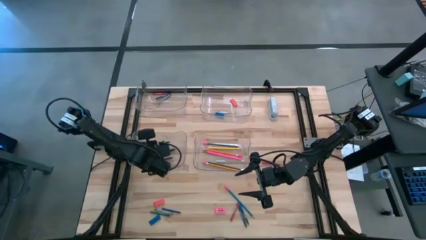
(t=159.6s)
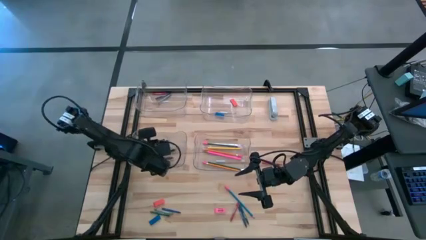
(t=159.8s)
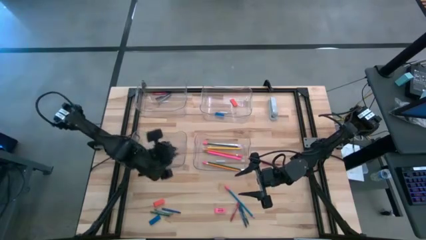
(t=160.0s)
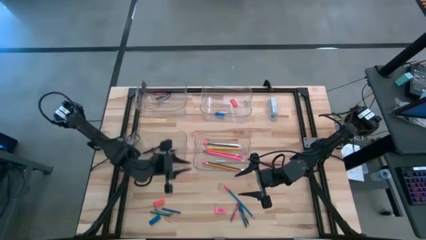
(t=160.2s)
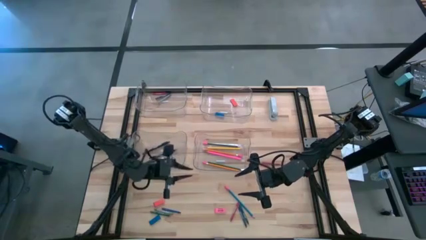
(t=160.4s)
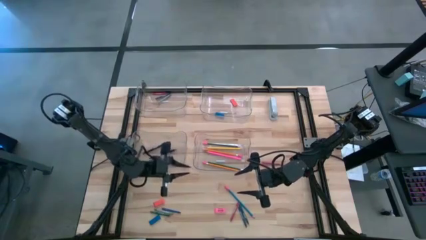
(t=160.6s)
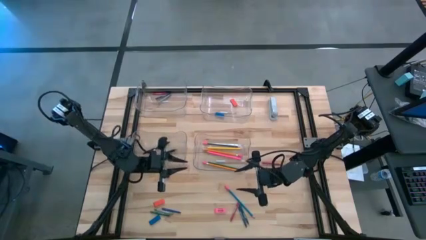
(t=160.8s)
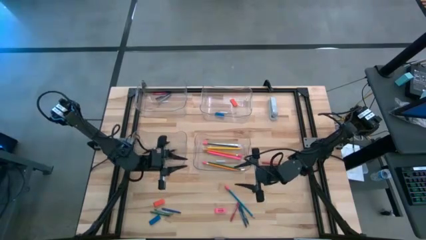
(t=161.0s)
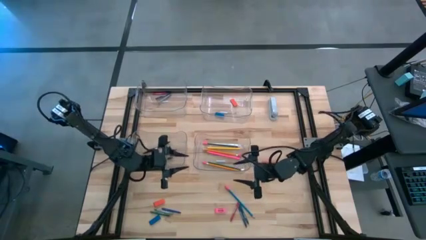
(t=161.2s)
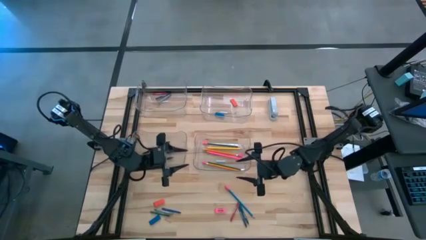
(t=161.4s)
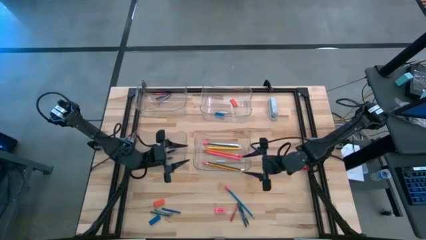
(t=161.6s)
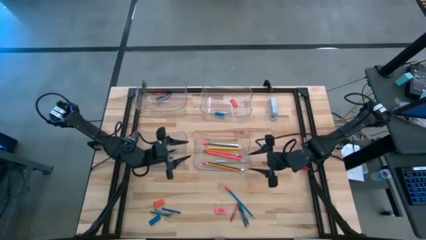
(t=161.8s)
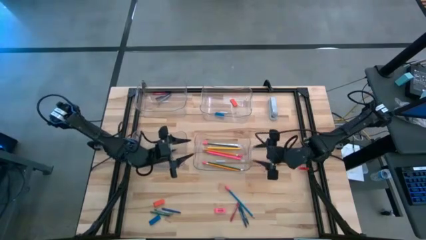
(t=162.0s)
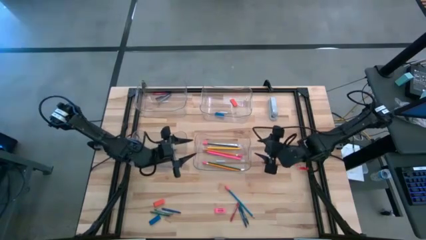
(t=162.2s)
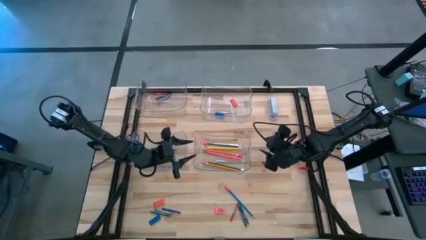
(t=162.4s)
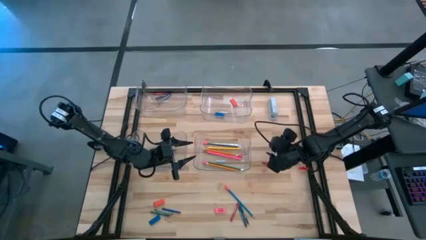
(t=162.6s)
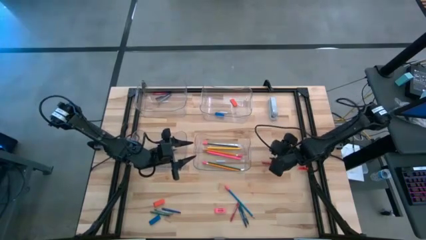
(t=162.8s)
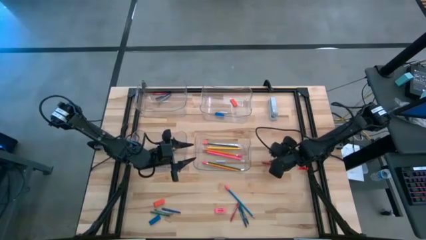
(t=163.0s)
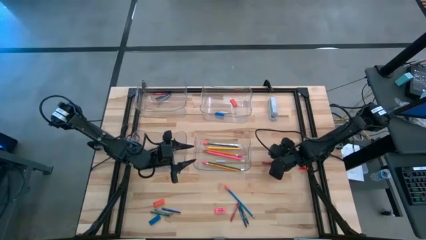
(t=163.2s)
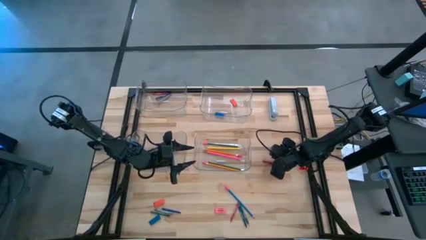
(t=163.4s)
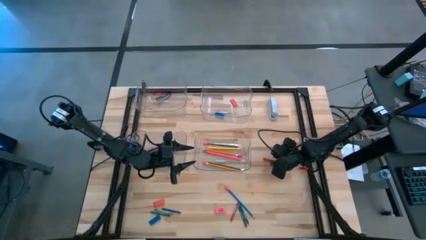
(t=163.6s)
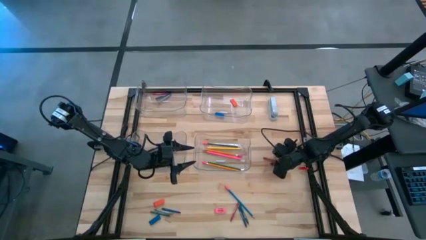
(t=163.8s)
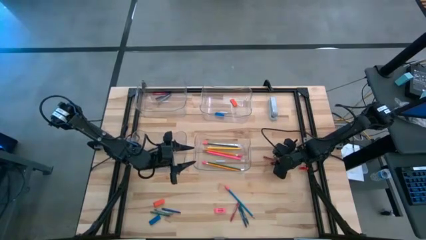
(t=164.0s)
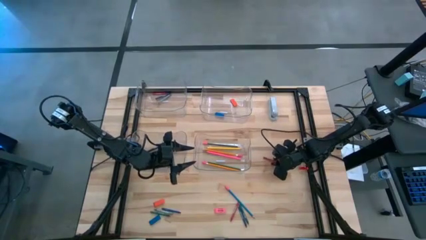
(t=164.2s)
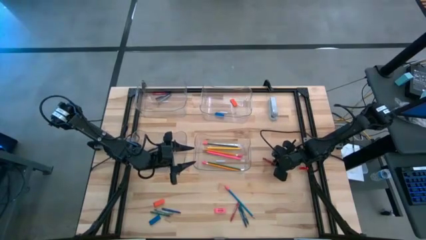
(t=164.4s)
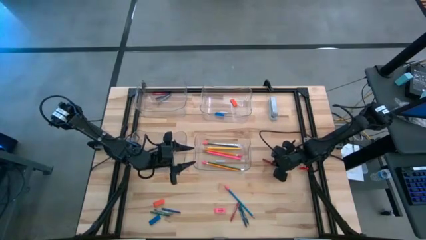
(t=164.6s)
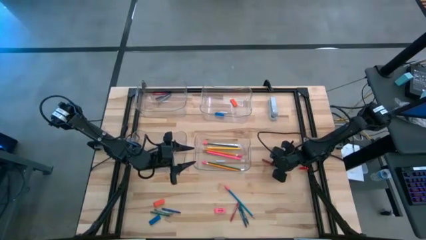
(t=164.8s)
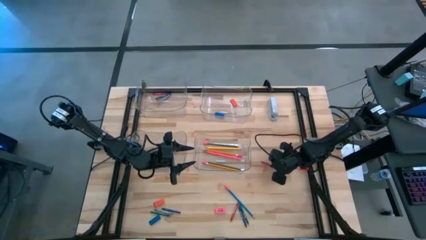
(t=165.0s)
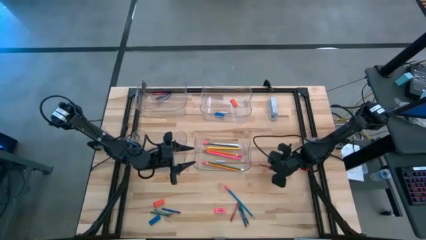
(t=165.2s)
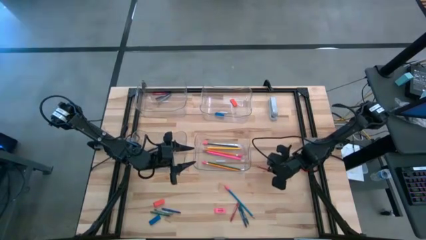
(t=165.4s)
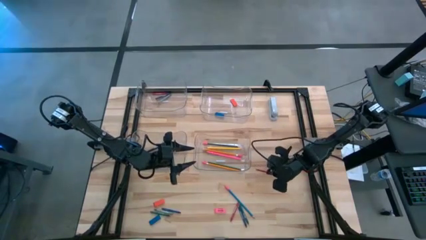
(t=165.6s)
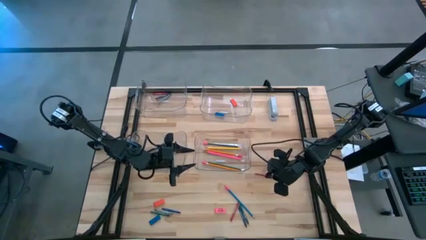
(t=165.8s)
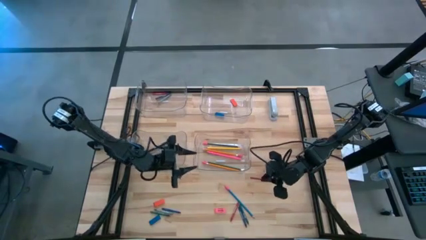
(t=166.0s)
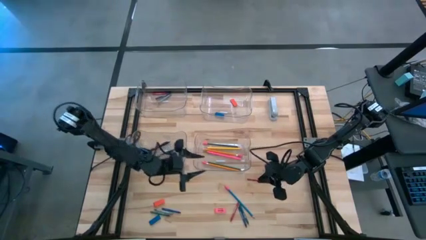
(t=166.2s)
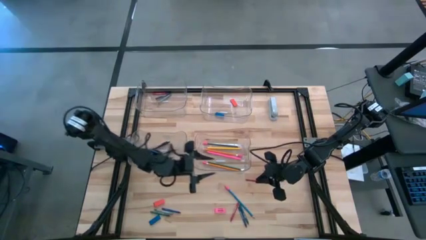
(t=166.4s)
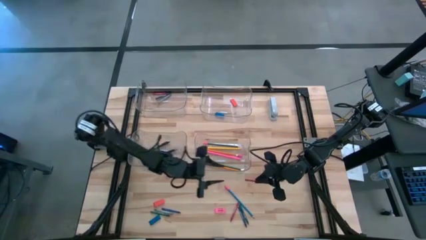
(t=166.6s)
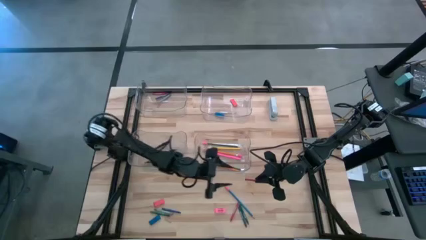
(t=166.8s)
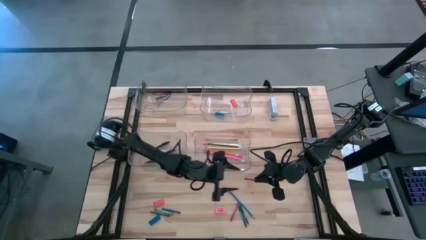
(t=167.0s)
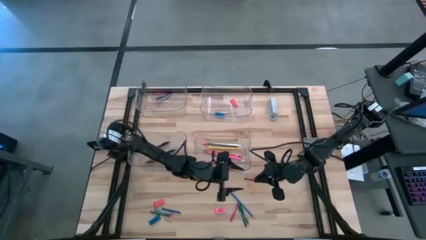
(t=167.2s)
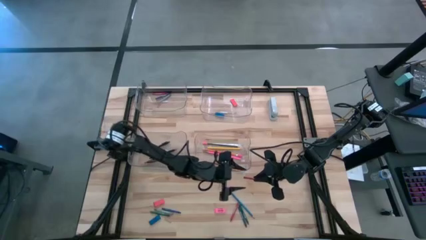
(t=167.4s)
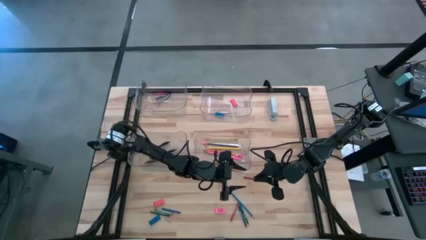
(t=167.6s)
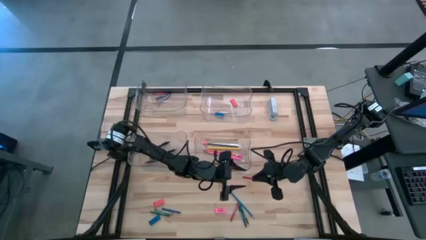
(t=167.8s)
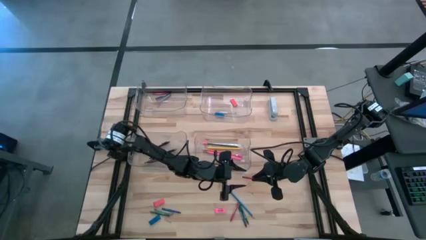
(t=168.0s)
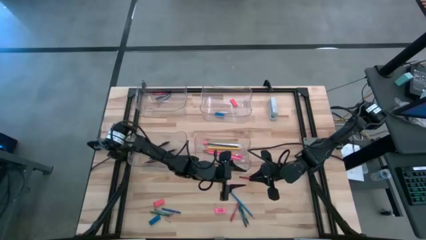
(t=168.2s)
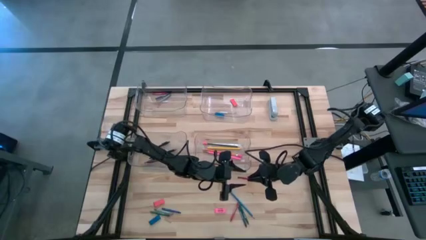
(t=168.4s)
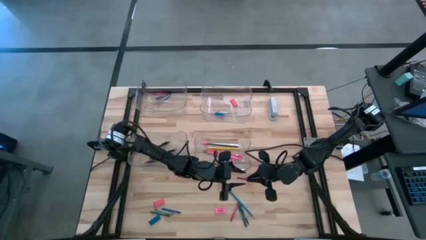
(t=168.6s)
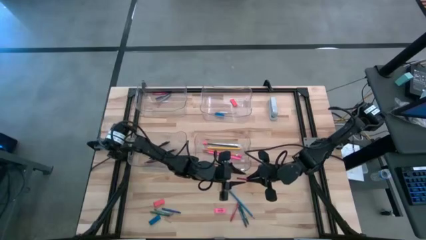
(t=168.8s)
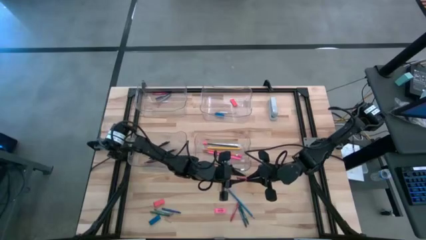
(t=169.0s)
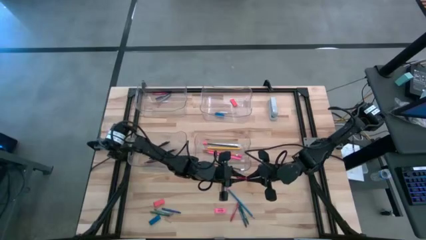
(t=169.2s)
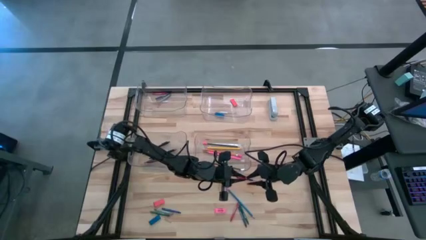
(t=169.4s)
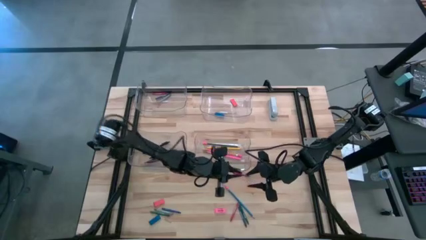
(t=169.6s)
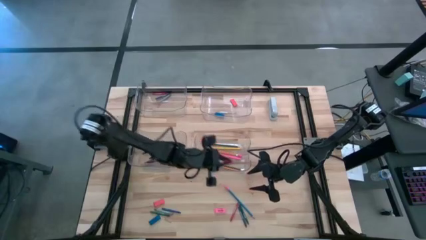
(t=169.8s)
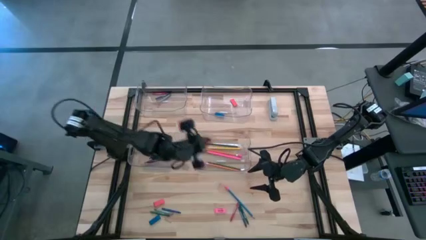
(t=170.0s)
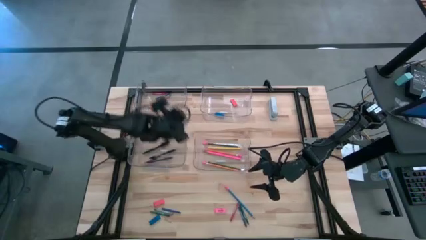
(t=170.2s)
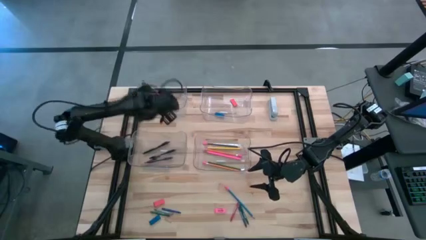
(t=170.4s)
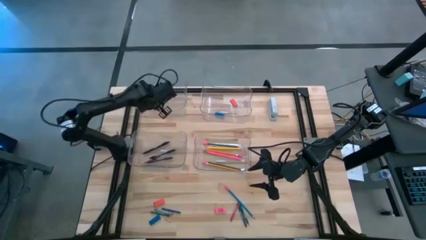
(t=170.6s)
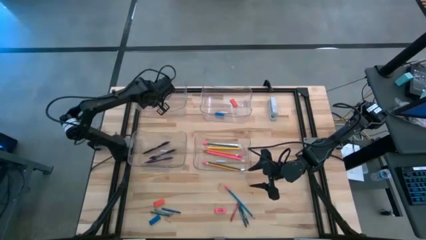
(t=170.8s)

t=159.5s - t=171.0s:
Task: Sort crayons/erasers/pens/pencils in bins
Put the top red crayon into the top left transparent bin

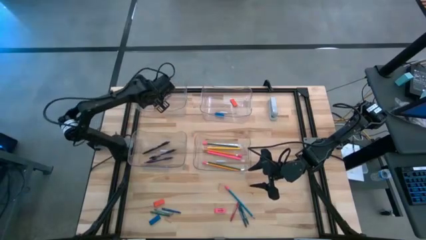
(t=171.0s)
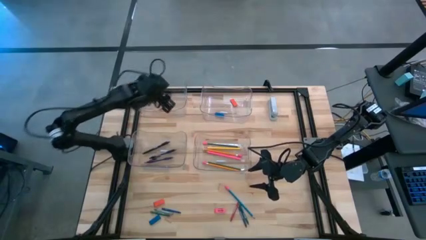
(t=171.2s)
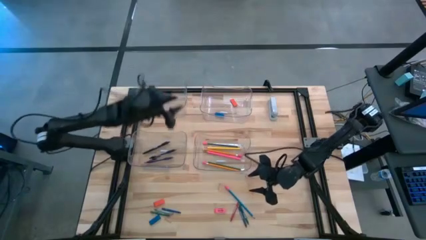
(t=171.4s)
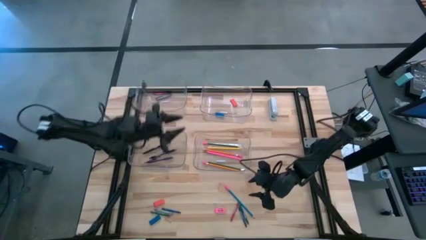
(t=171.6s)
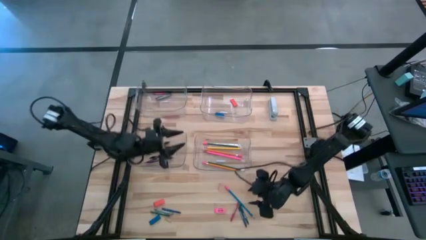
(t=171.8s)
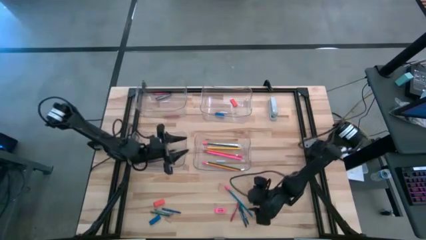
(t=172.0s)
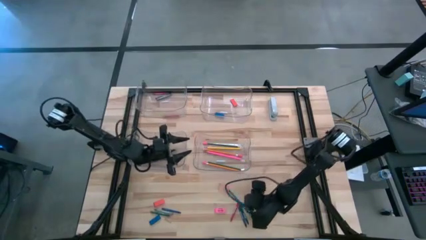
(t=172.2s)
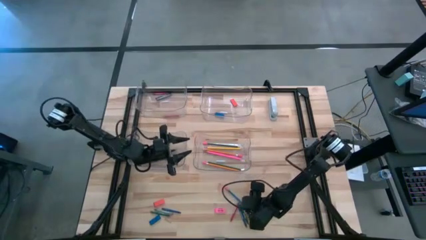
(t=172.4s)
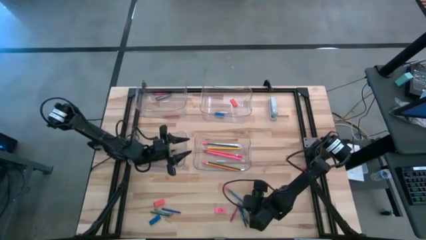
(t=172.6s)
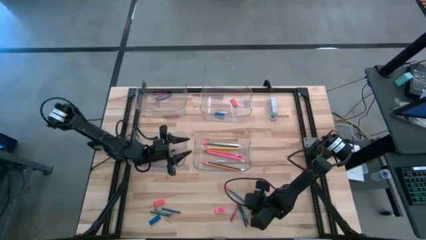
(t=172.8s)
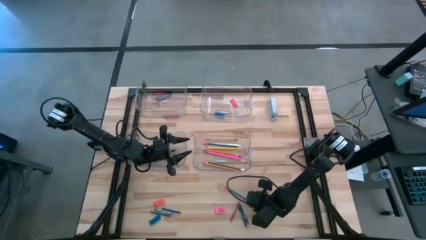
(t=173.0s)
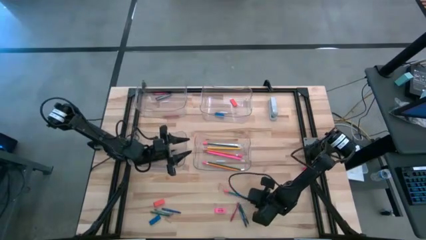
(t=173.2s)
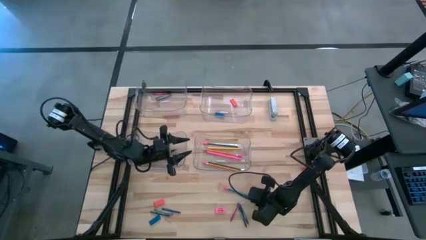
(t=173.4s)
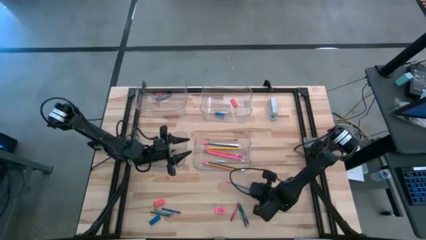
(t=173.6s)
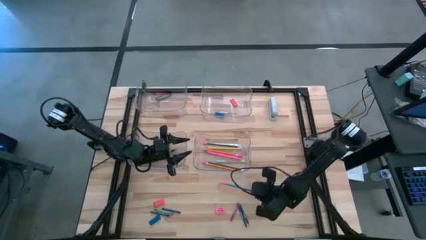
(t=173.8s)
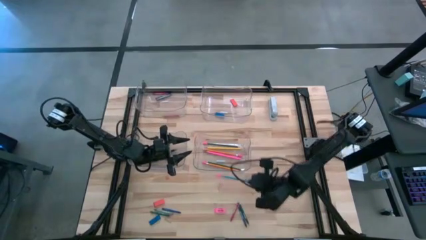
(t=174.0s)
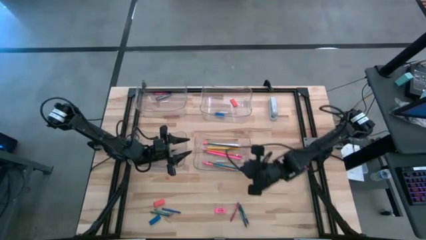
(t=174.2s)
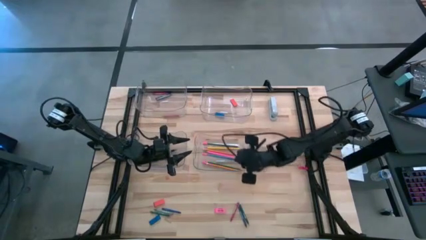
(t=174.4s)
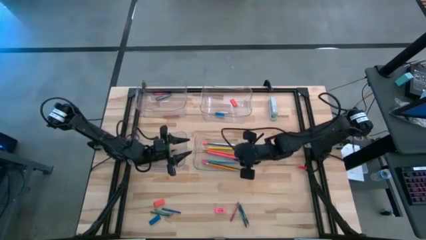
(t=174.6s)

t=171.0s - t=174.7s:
Put the blue pencil into the bottom right transparent bin
